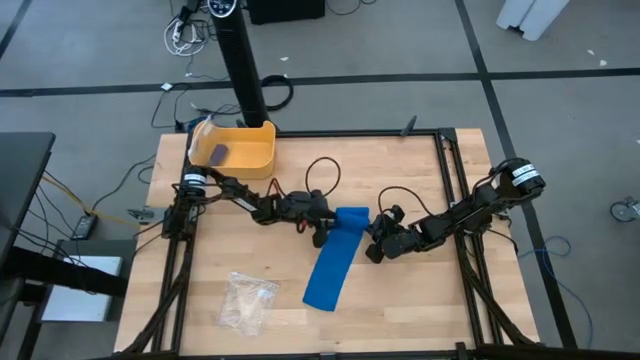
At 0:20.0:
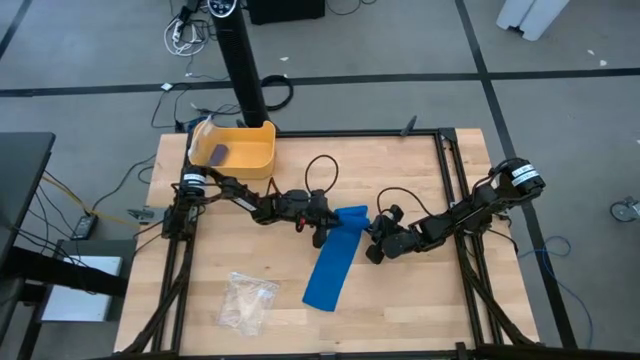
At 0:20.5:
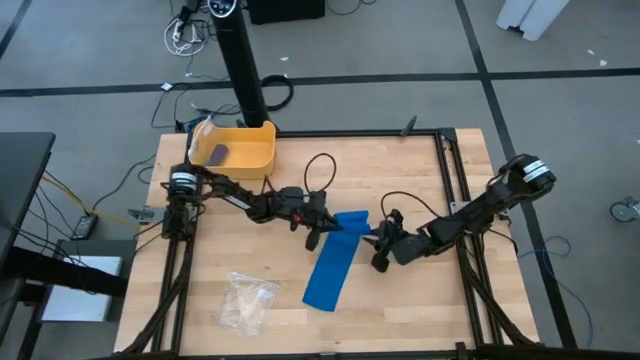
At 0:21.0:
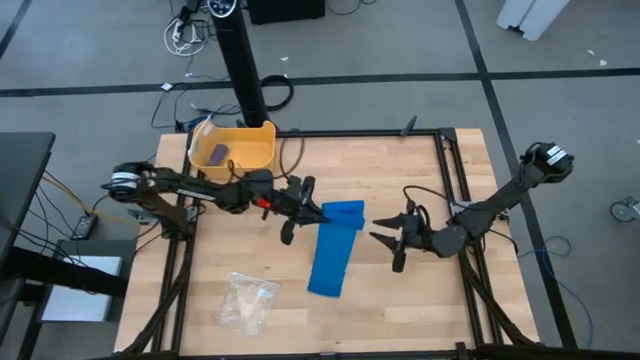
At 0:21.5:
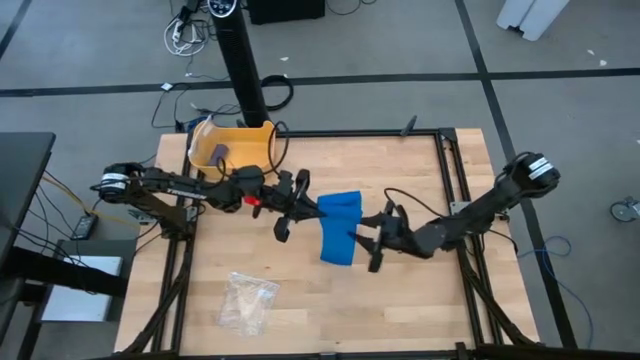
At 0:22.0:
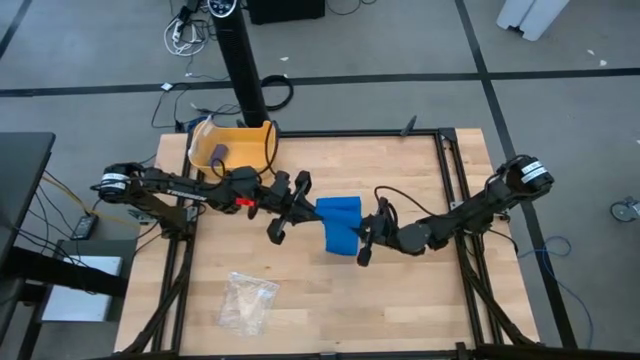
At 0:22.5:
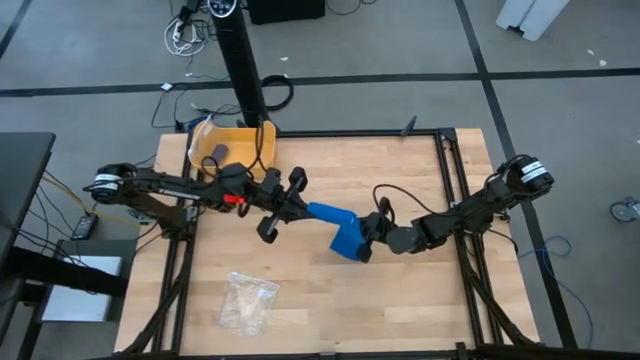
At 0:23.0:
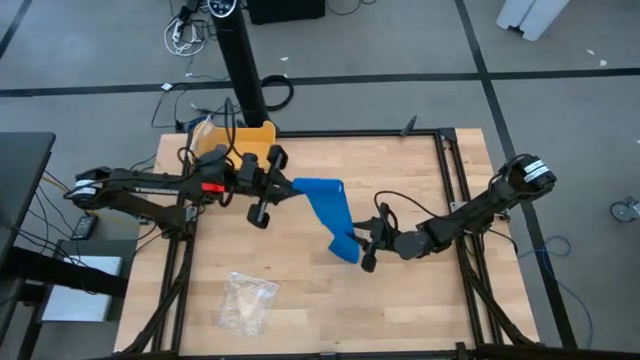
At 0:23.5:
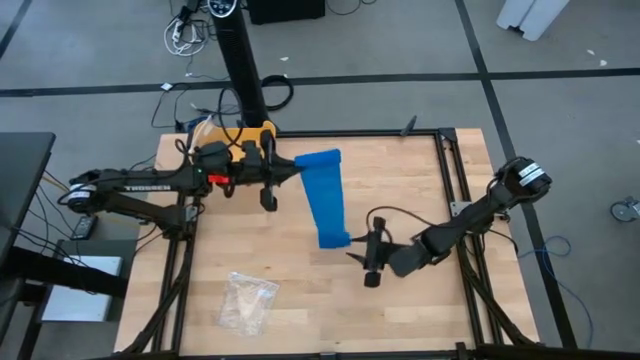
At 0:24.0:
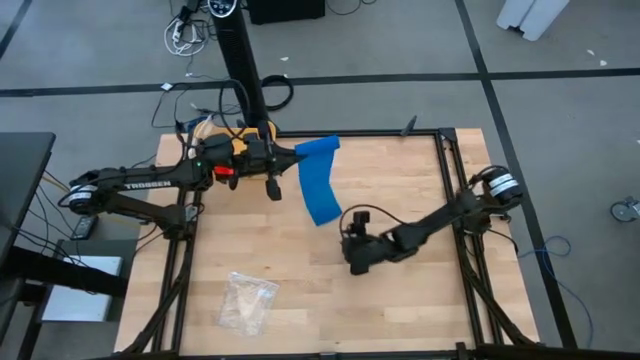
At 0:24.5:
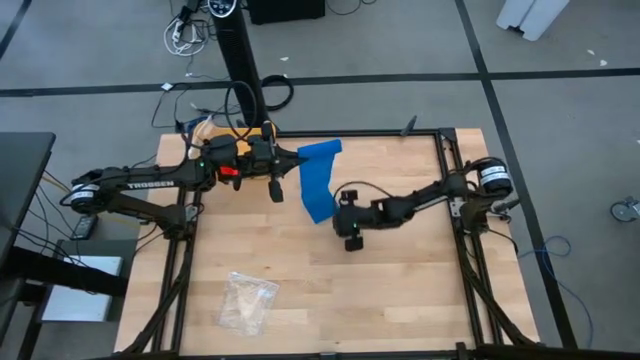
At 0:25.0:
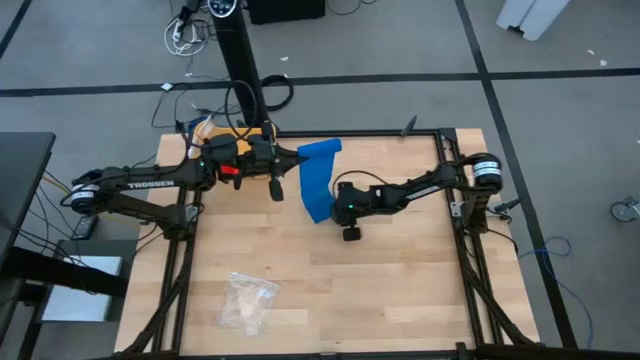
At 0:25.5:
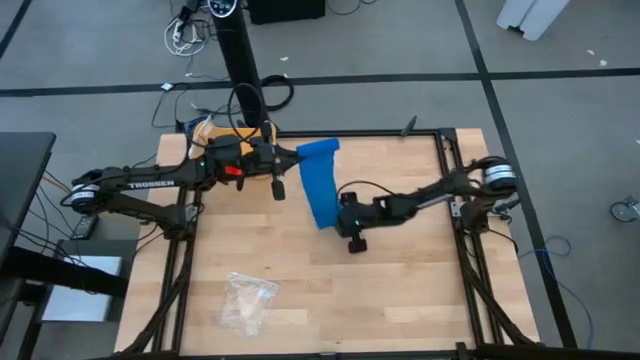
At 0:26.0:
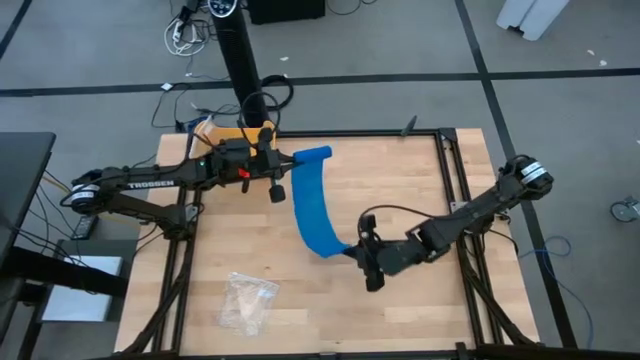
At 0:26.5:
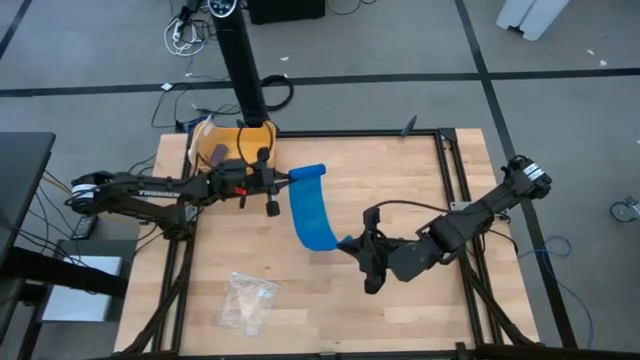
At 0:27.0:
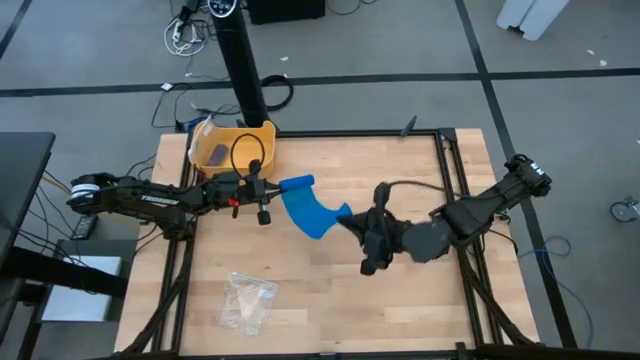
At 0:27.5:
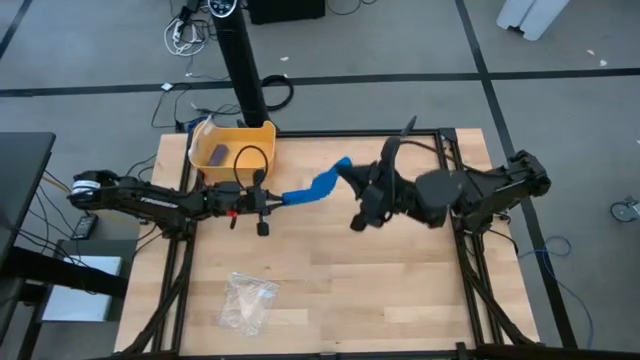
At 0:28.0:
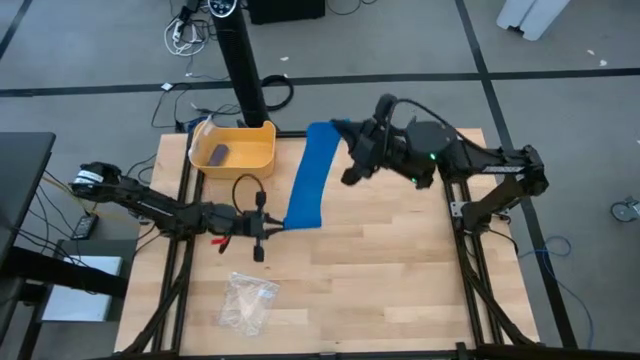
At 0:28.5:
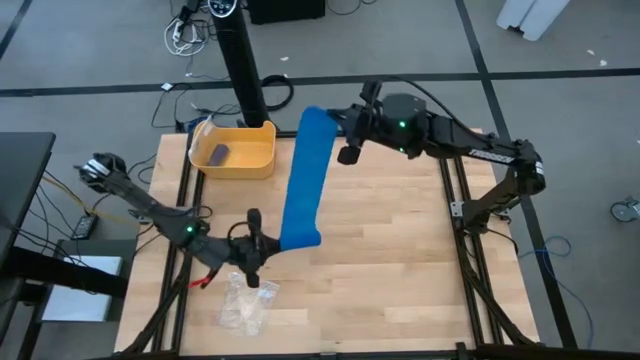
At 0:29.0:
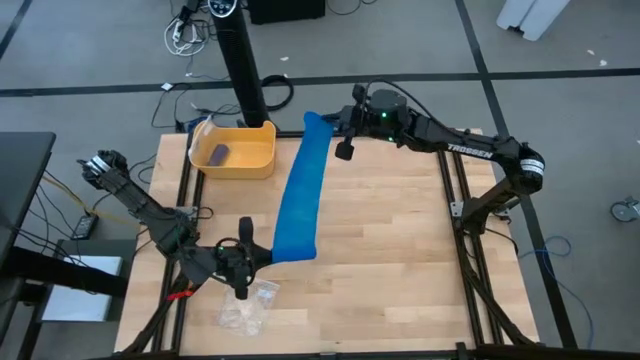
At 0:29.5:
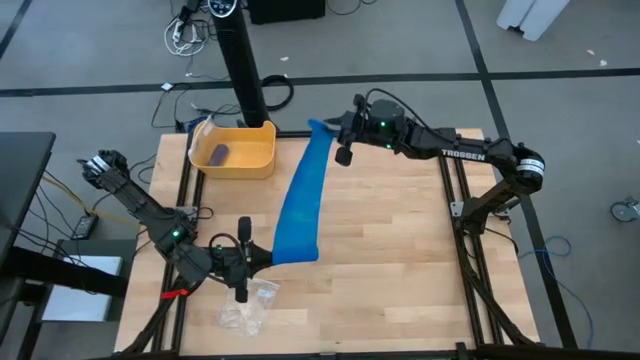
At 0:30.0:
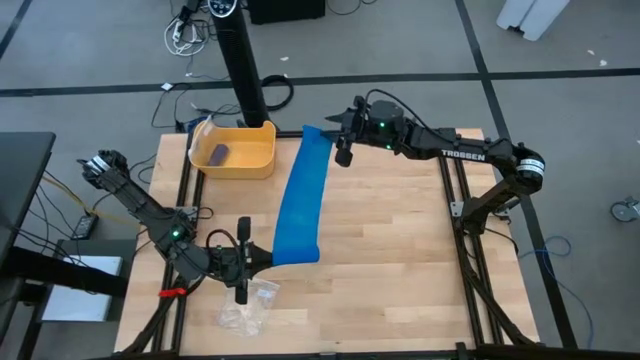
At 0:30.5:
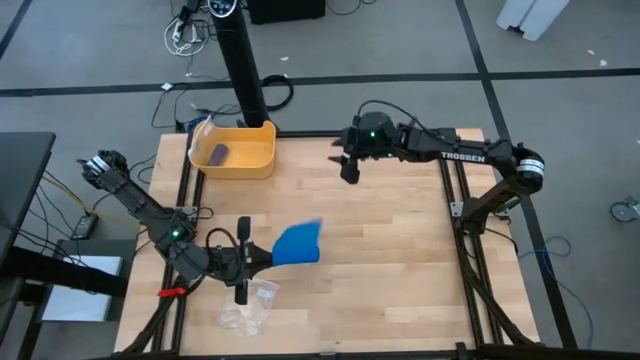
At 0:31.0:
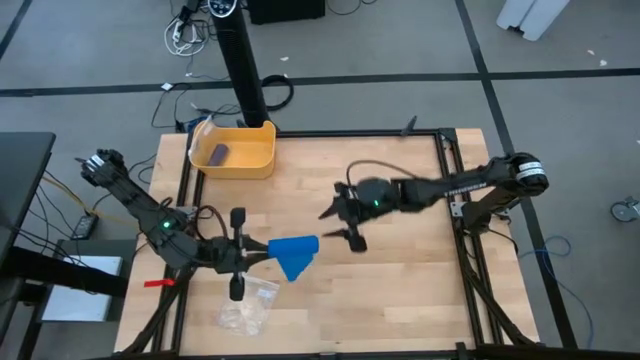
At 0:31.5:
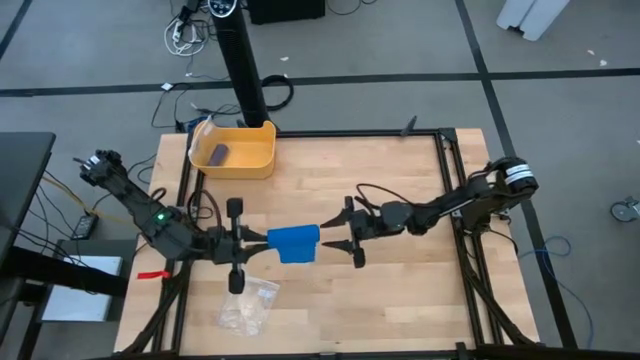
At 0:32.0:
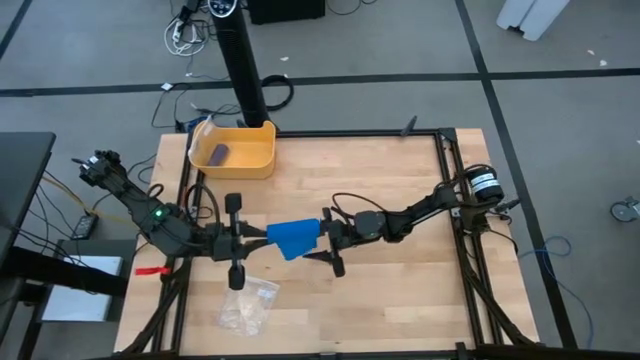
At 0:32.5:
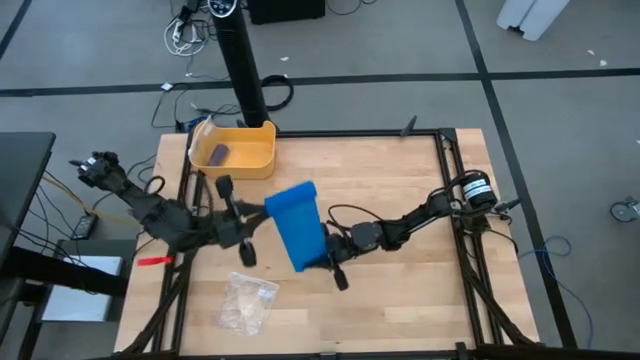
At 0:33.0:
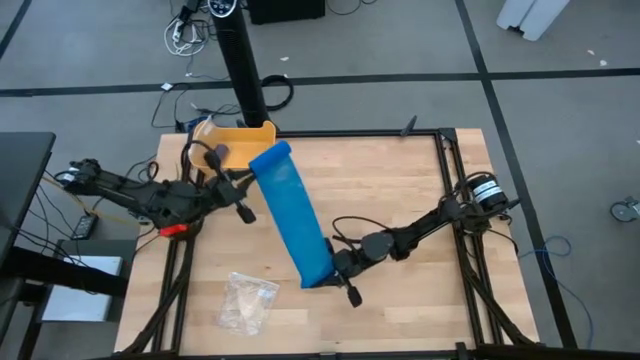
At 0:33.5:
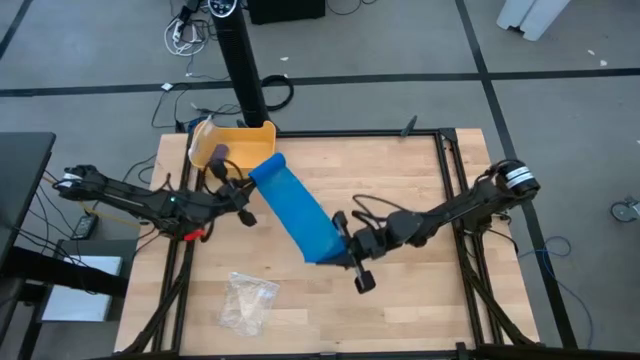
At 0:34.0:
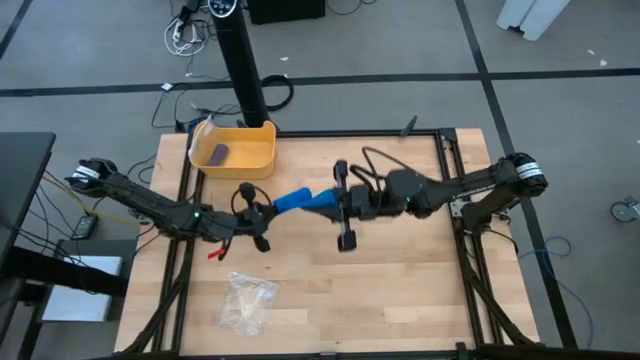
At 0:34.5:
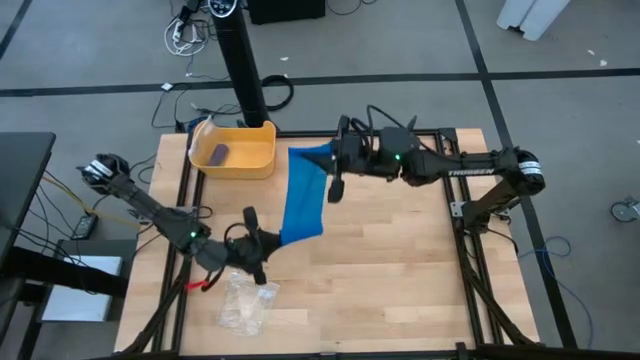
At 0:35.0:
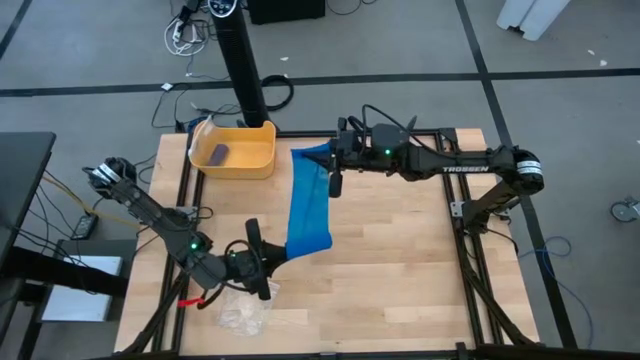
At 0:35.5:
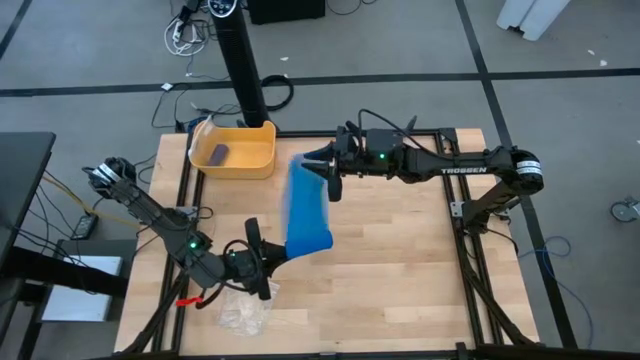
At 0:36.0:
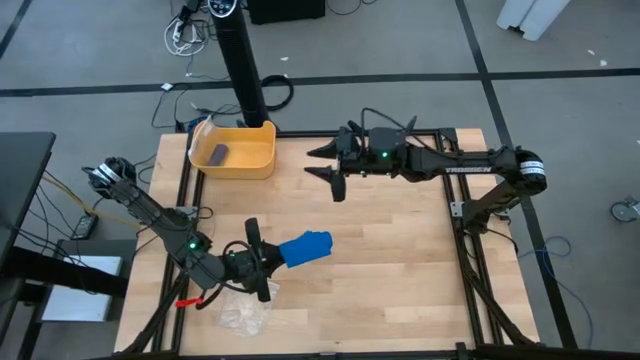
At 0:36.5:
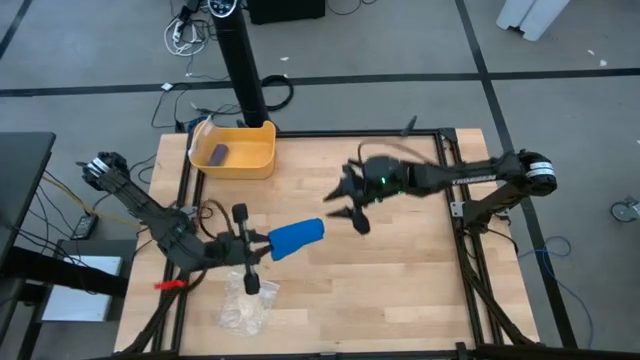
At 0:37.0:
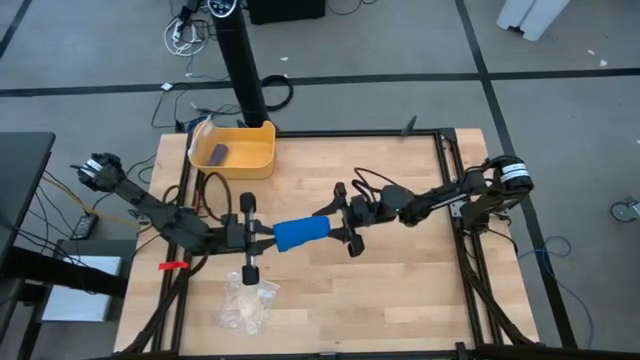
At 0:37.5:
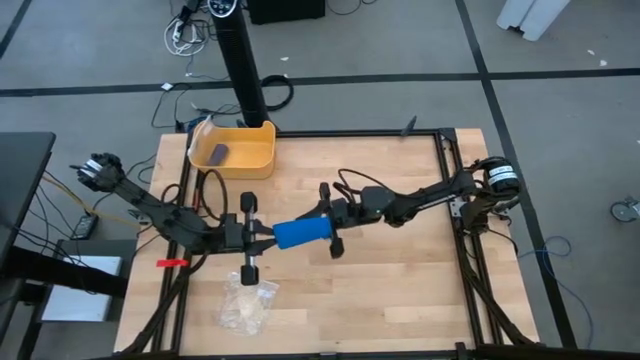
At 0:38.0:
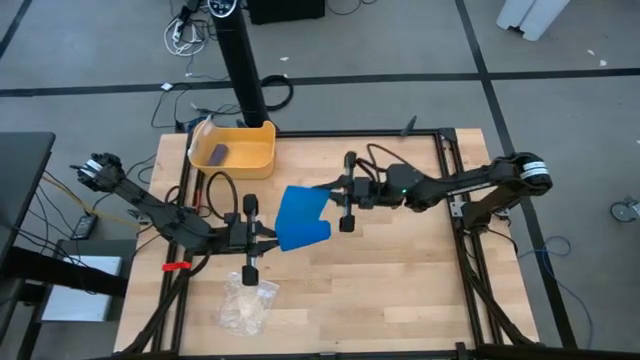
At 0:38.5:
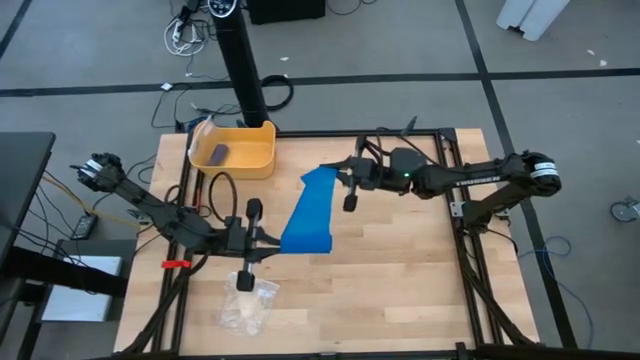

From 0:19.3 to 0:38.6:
Task: Roll bandage
Roll the blue bandage
